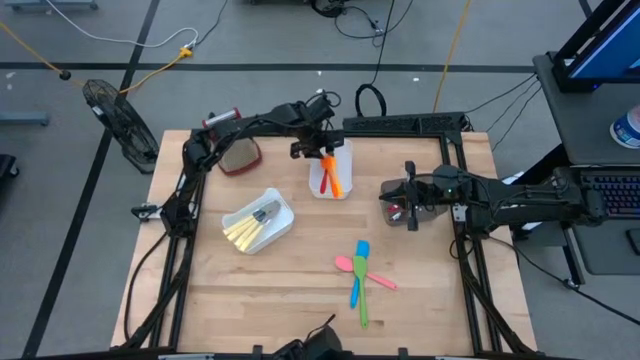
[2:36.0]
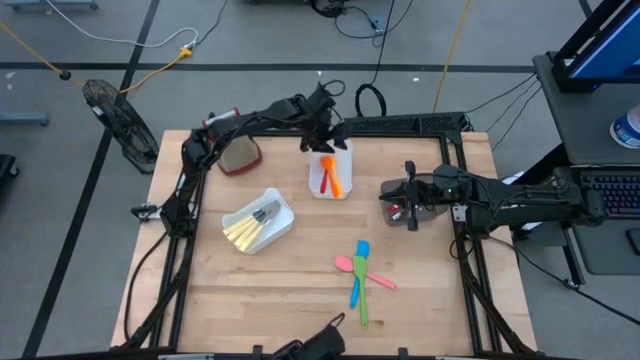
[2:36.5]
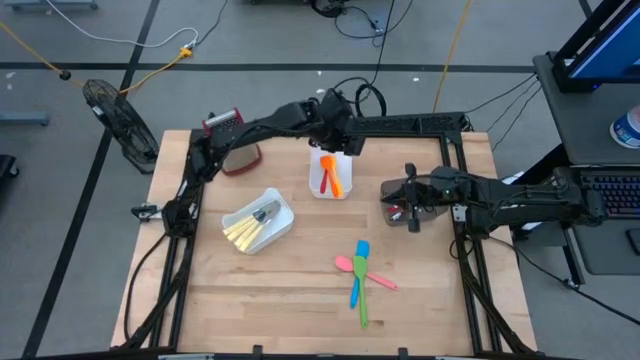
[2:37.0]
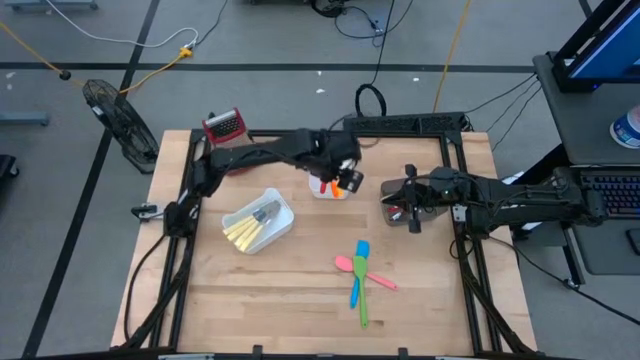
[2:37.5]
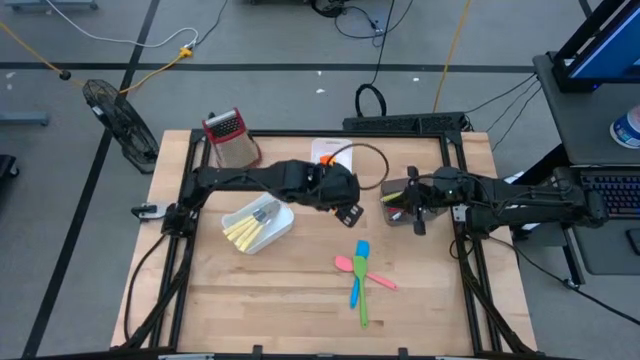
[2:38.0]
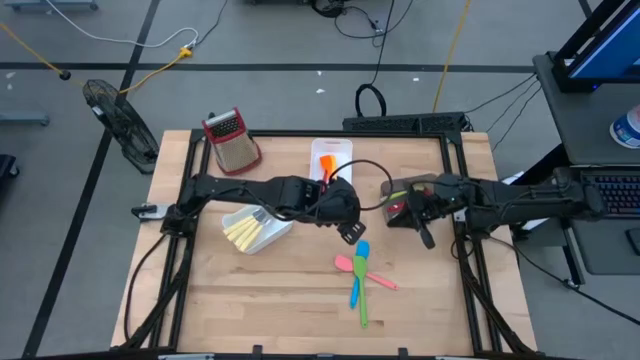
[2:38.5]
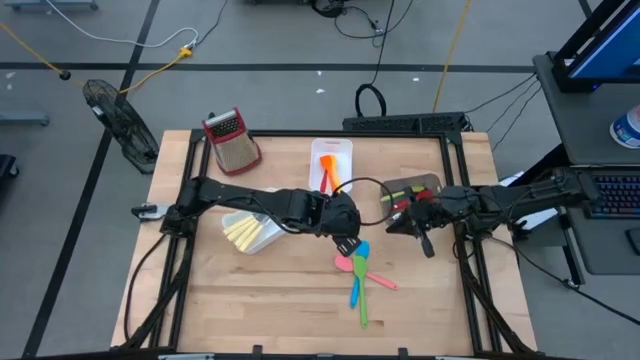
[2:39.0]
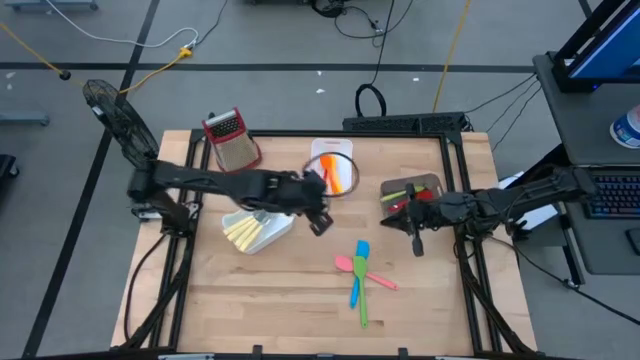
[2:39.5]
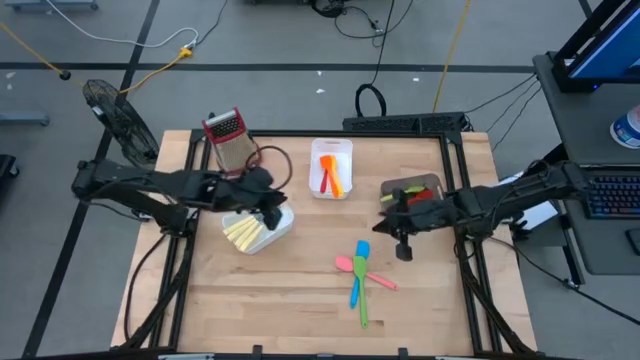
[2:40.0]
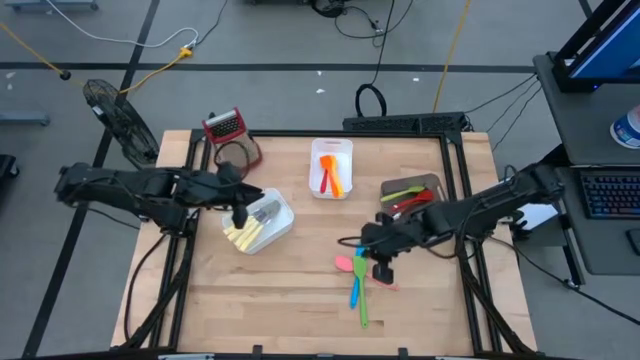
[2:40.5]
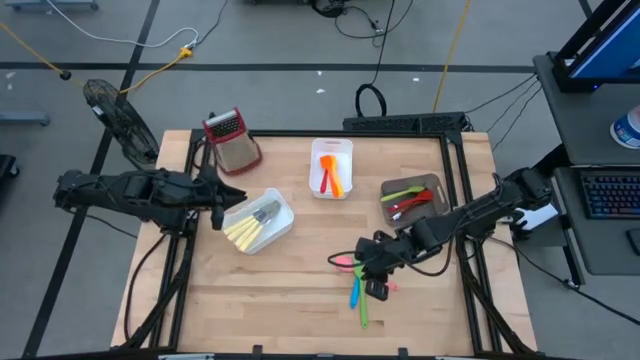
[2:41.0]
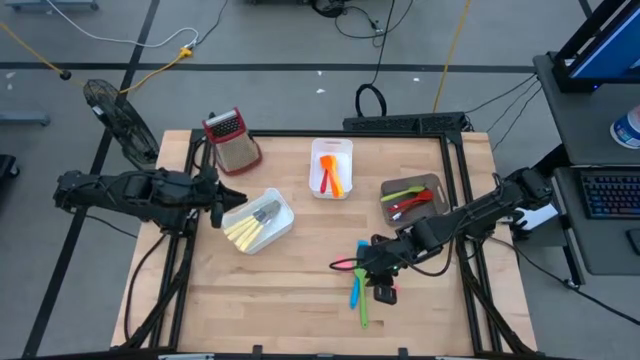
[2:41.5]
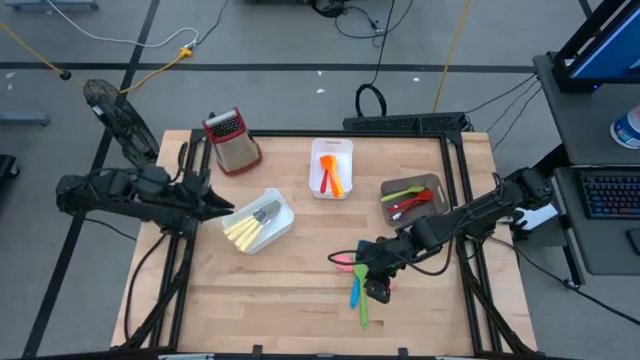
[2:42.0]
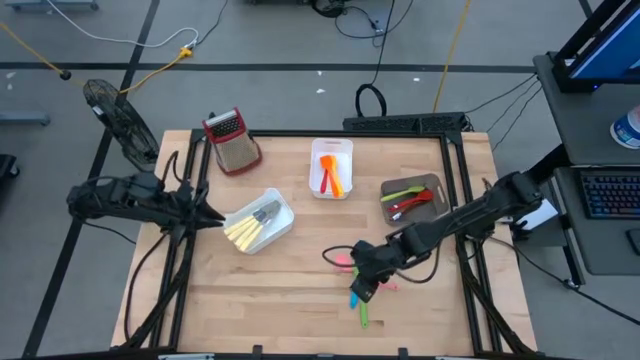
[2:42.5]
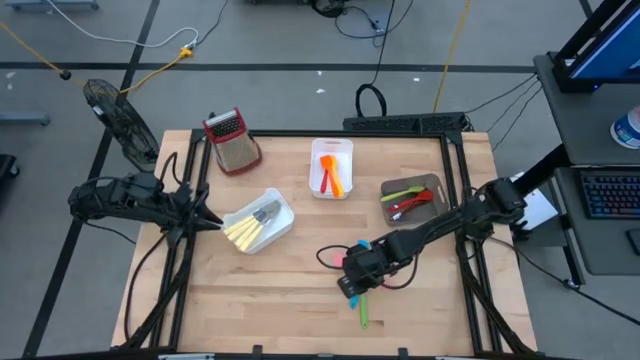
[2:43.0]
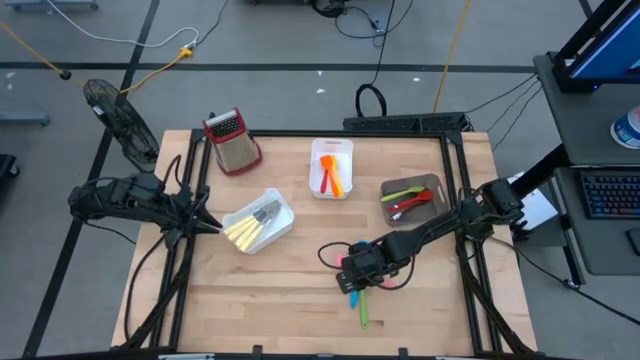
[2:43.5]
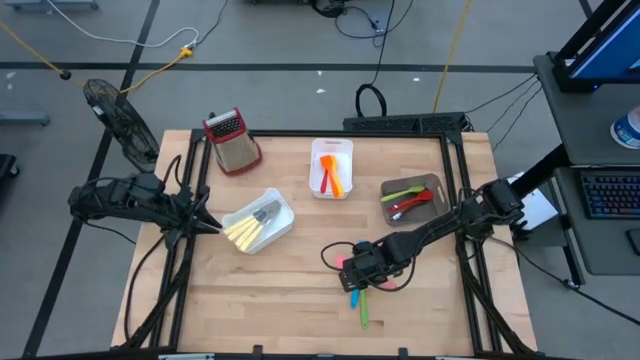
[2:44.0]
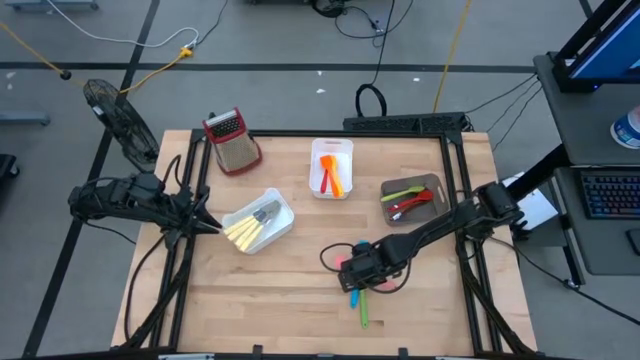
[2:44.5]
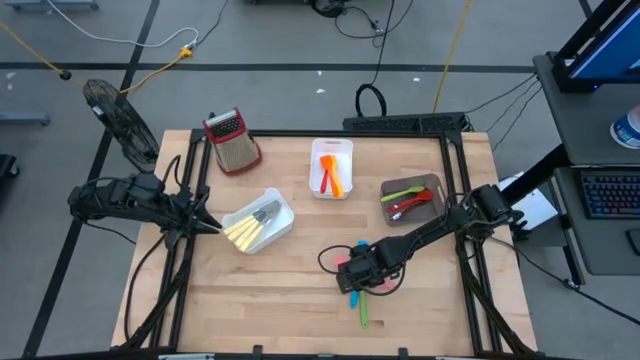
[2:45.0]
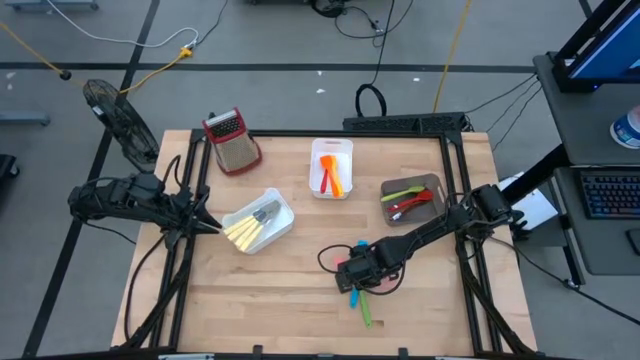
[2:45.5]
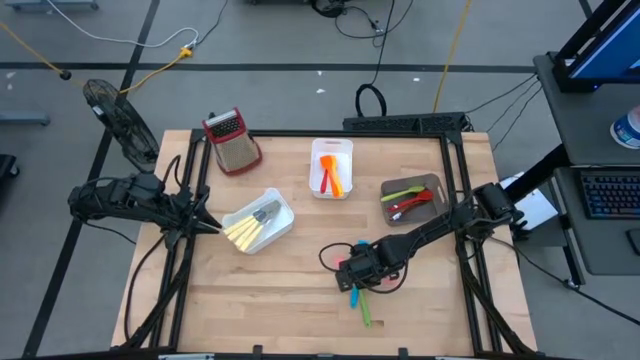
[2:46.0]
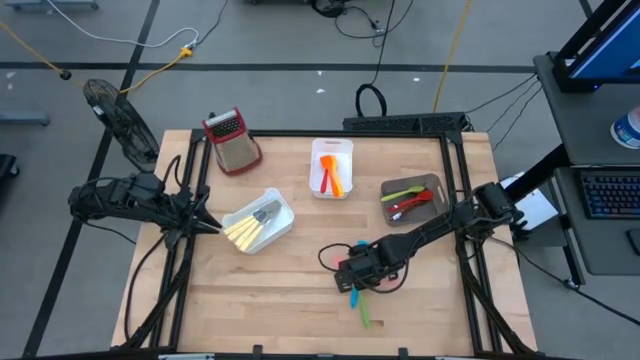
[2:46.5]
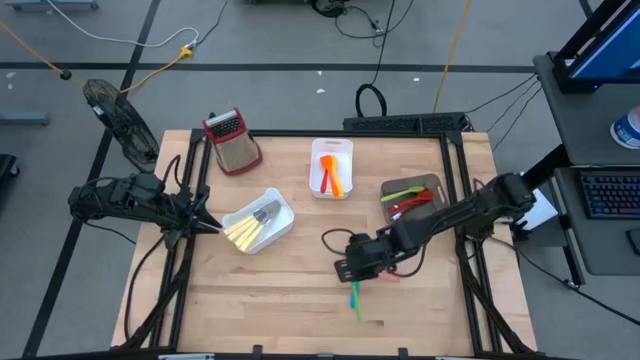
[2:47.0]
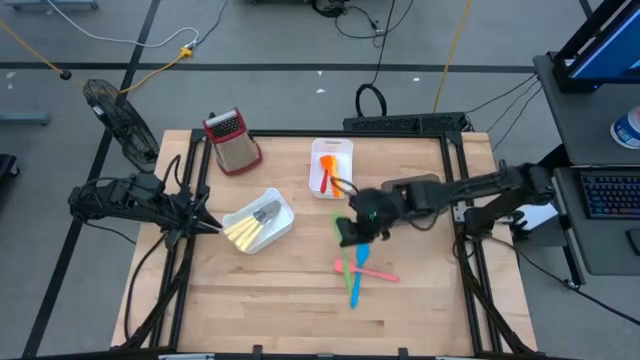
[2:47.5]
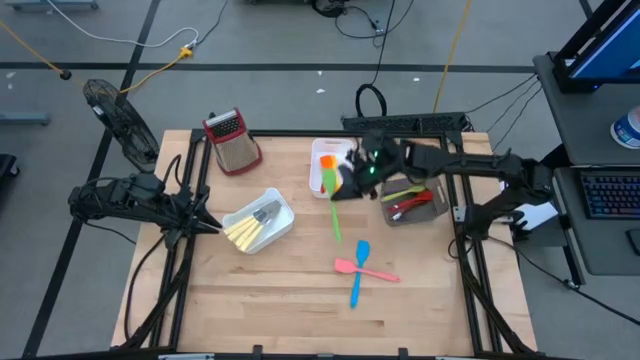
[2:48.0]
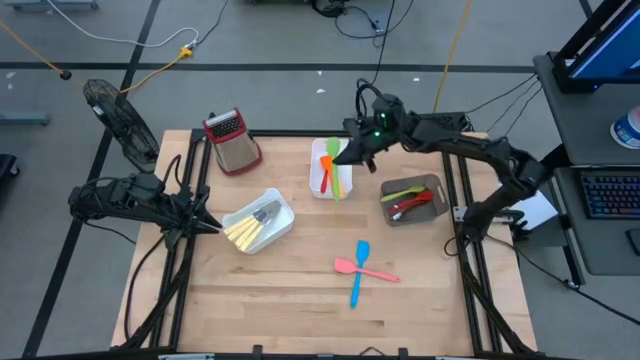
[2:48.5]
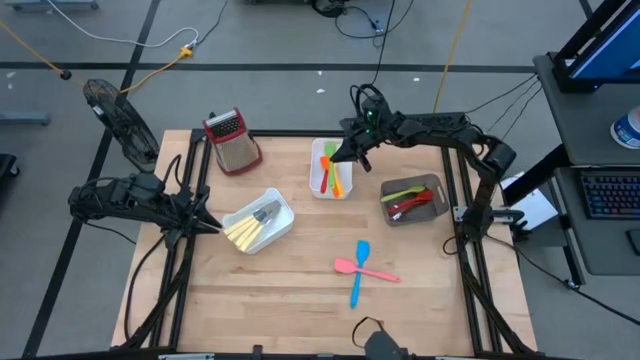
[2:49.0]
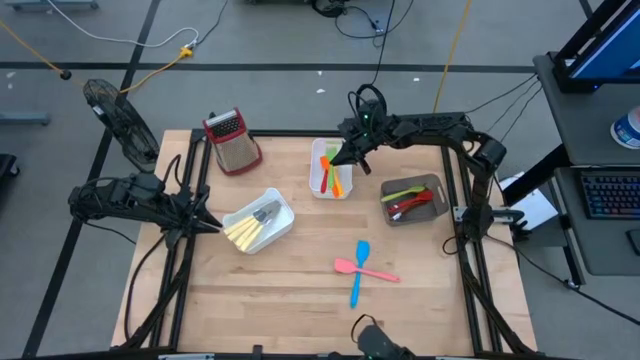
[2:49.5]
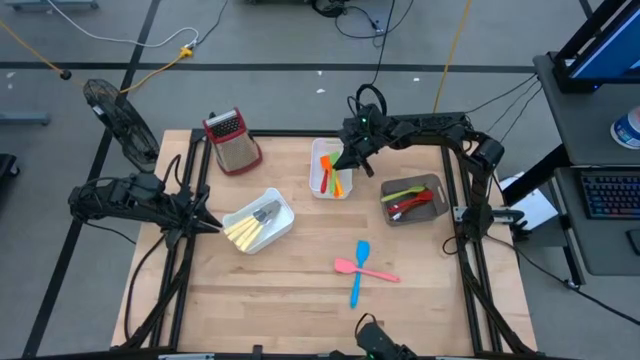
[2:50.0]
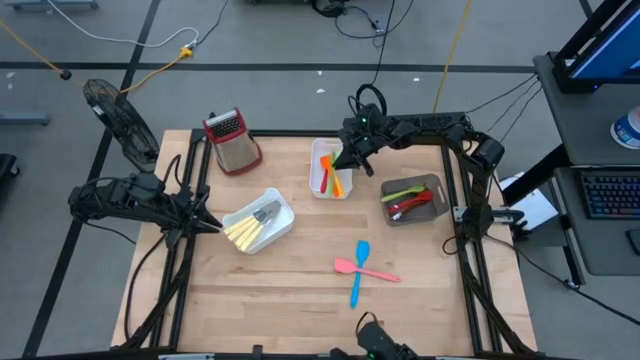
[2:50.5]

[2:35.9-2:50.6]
Task: Pick & Place Kitchen Items
Put the green spatula into the top white bin

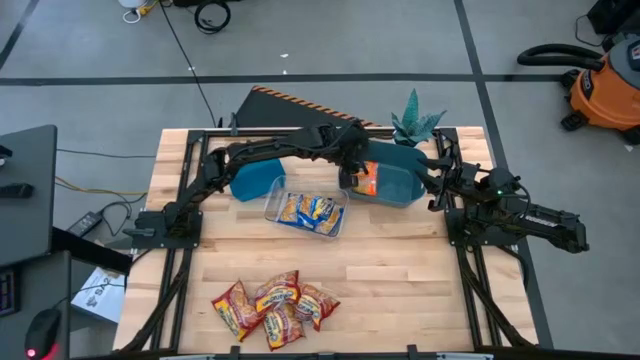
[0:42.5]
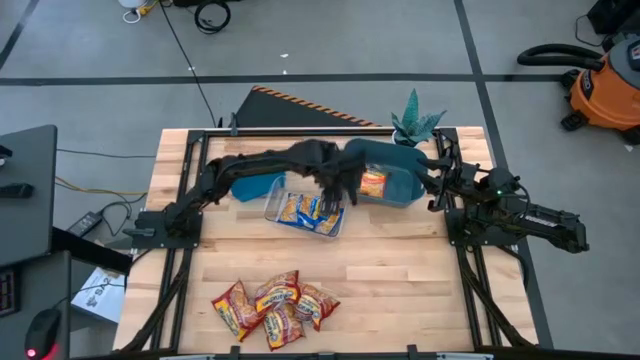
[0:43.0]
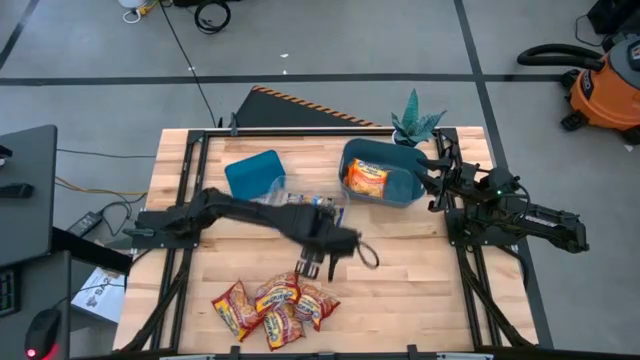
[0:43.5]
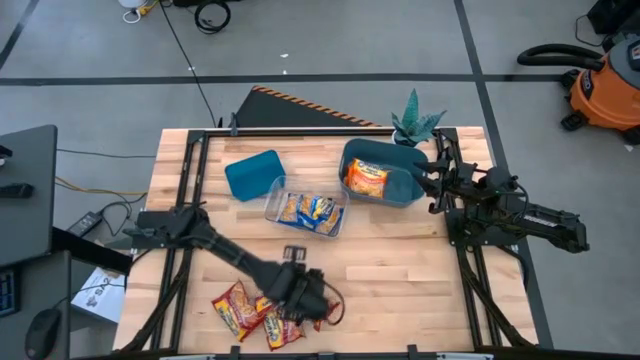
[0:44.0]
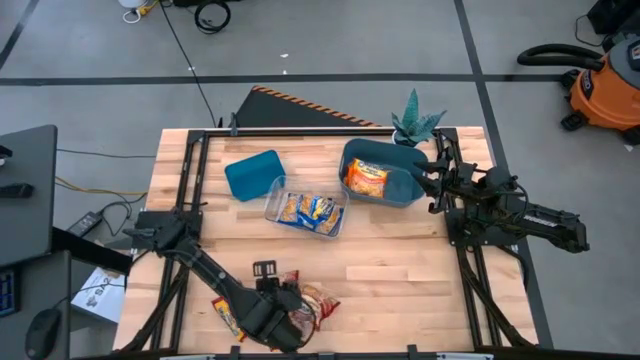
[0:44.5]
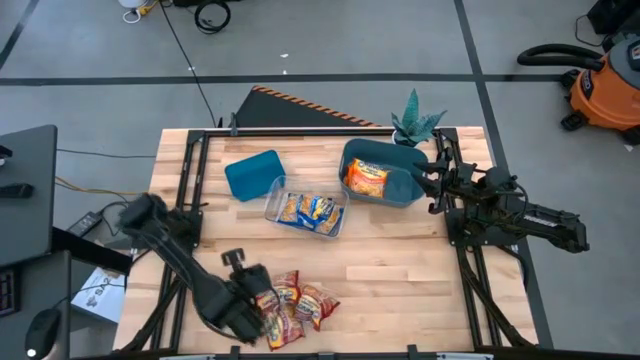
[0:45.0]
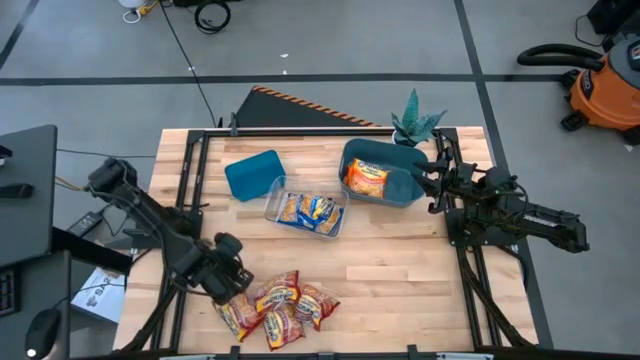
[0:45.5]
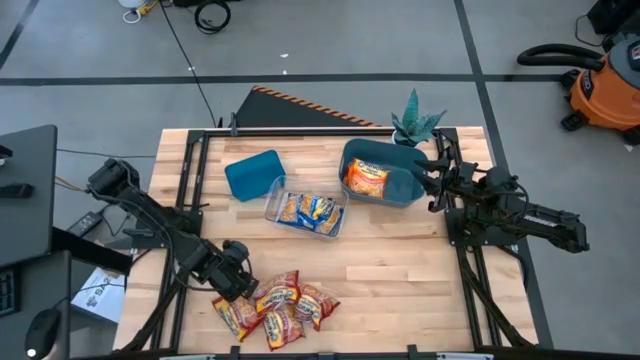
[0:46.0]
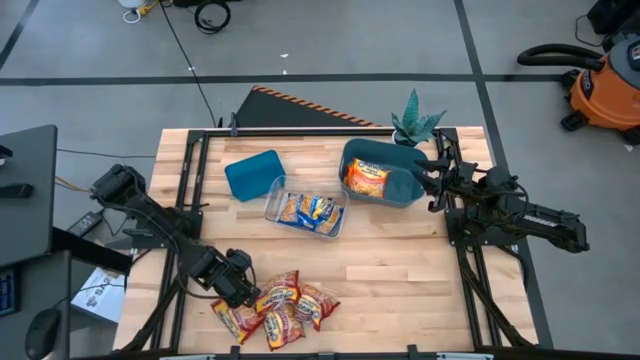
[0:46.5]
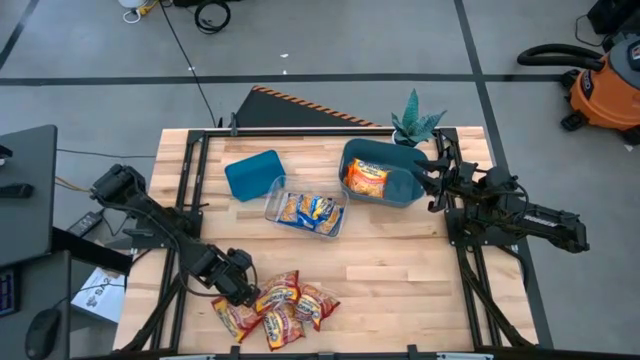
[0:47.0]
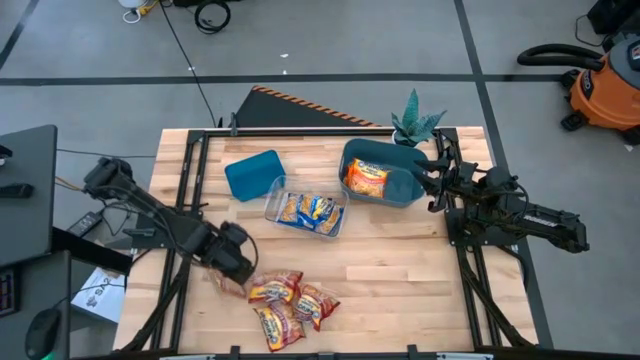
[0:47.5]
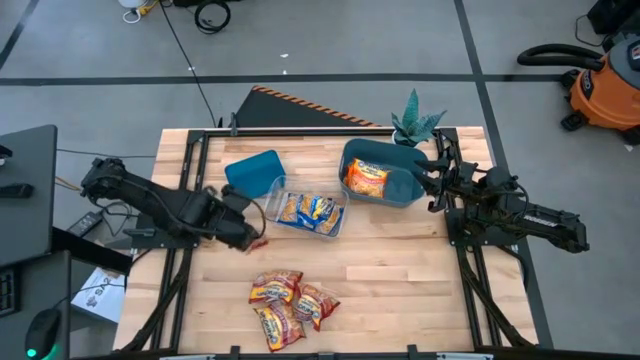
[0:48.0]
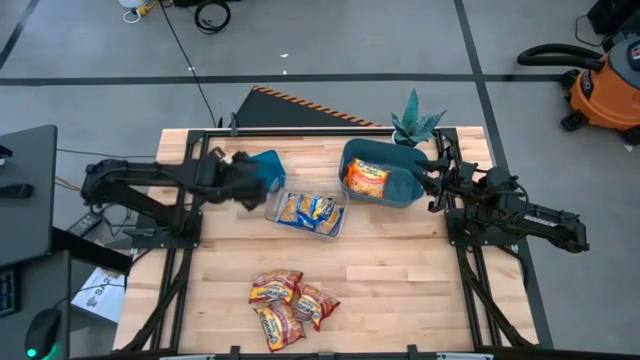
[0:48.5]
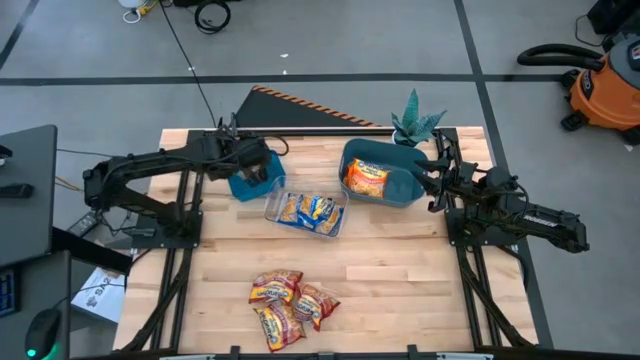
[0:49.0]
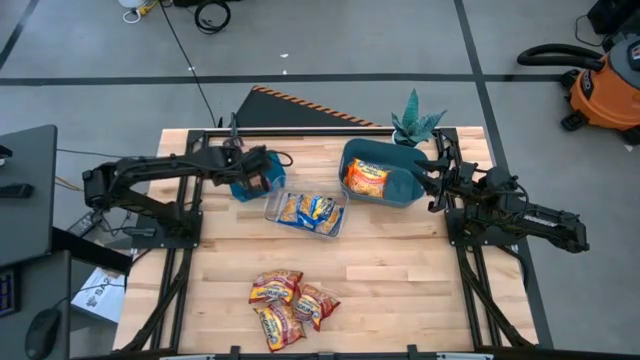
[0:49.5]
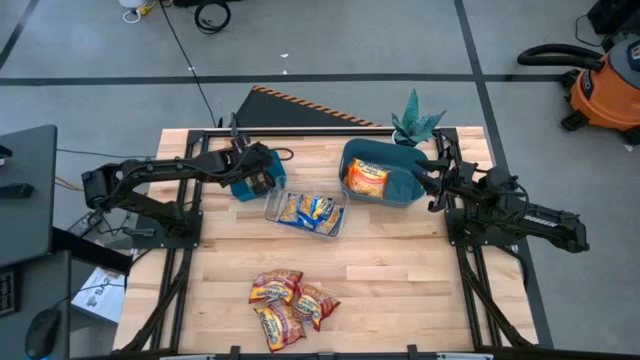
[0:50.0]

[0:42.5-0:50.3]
Task: Sort Maruchan noodles
Put the red noodle pack into the left small blue bin
